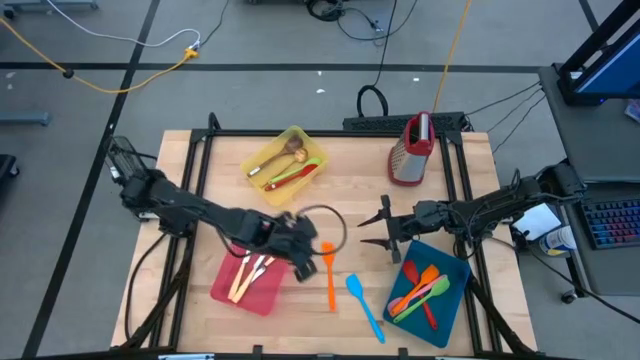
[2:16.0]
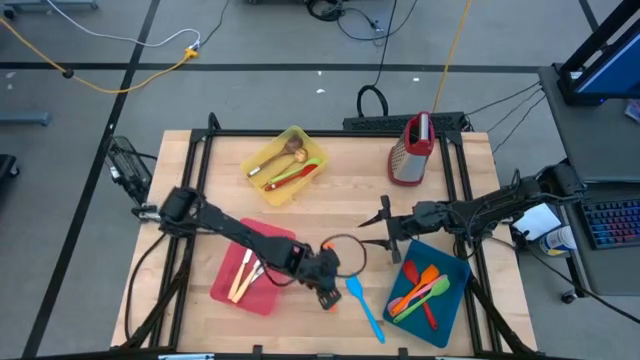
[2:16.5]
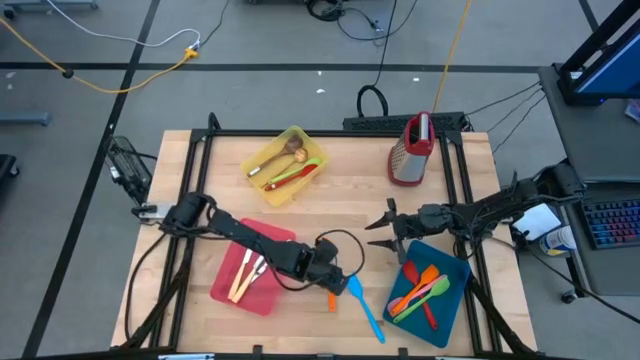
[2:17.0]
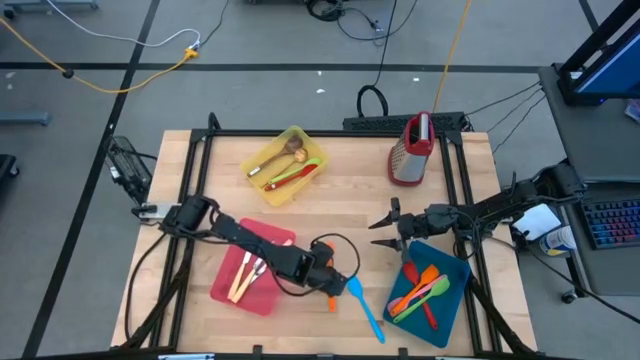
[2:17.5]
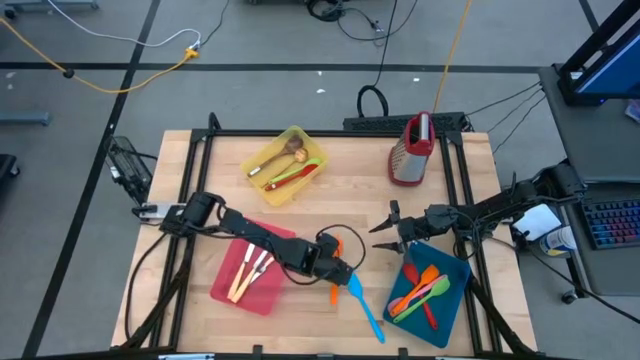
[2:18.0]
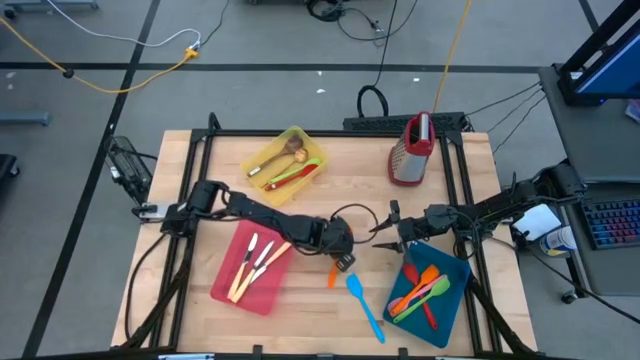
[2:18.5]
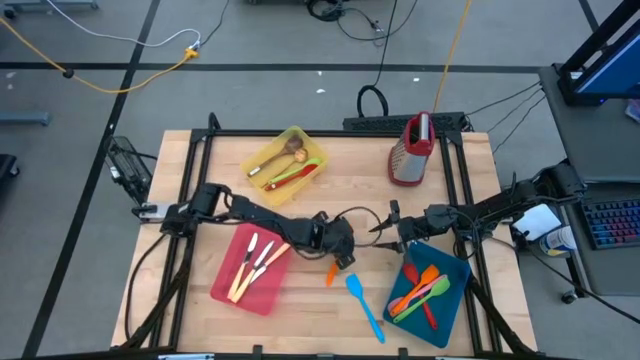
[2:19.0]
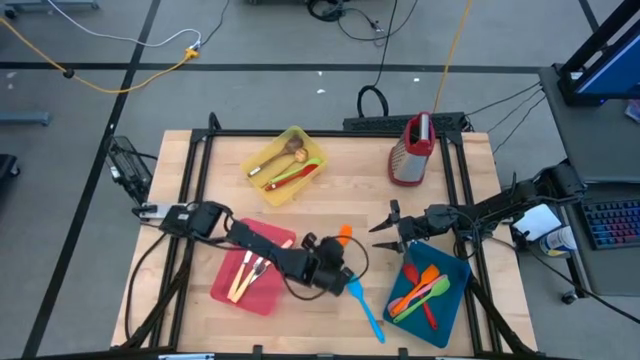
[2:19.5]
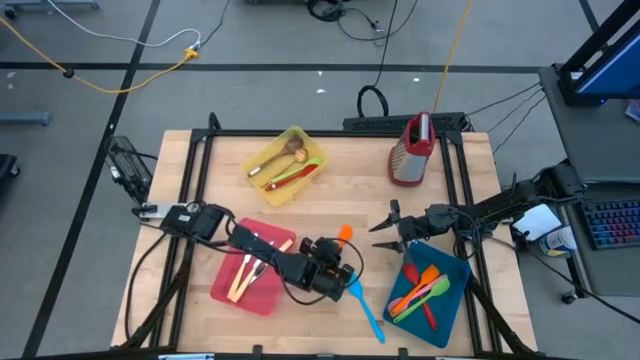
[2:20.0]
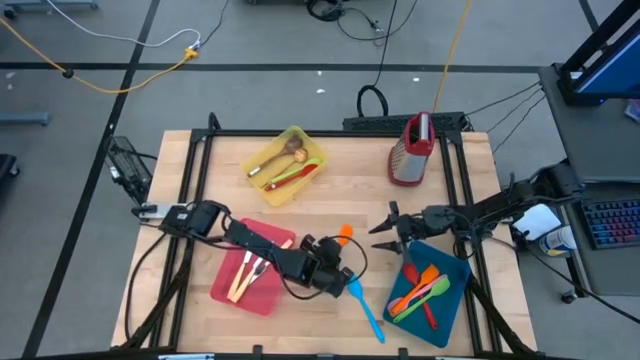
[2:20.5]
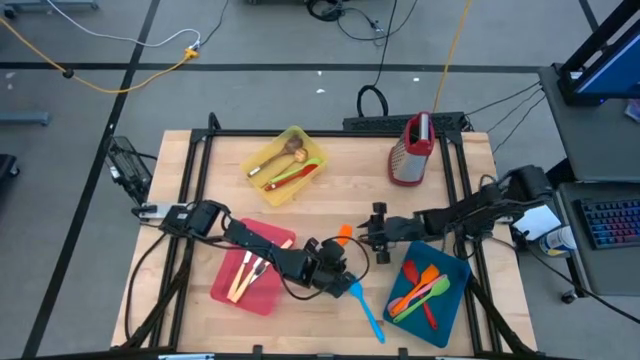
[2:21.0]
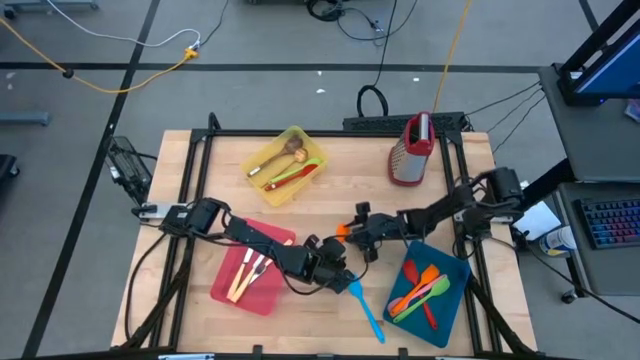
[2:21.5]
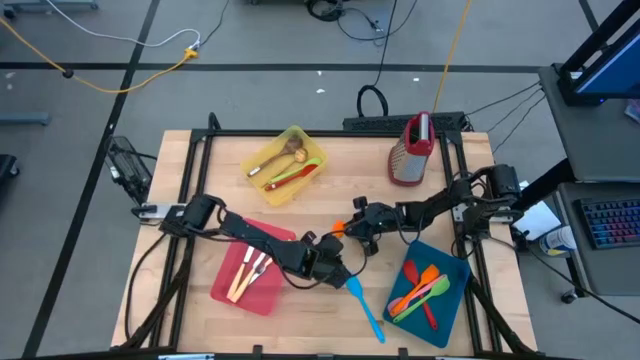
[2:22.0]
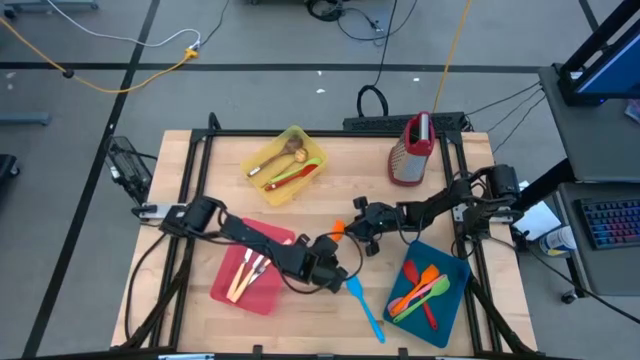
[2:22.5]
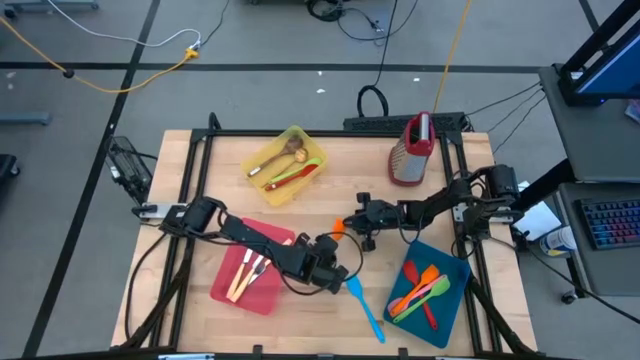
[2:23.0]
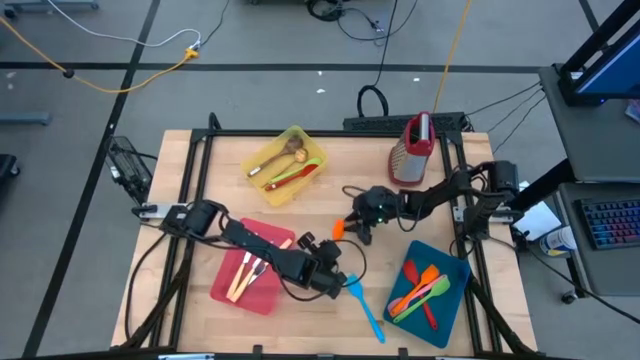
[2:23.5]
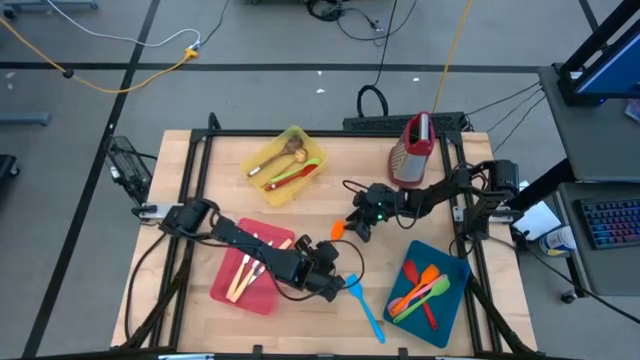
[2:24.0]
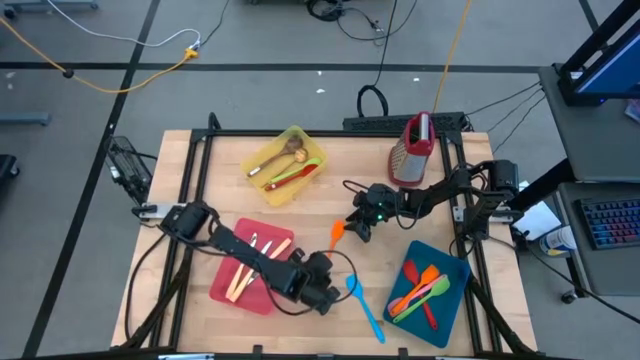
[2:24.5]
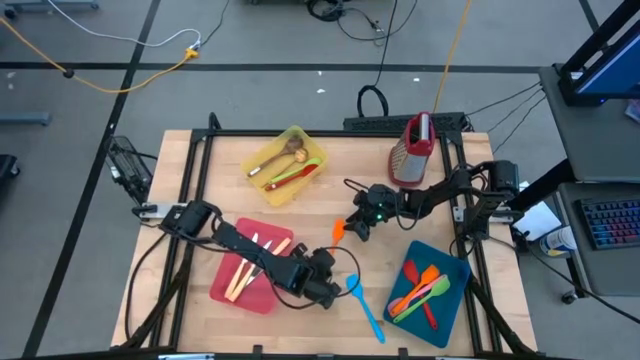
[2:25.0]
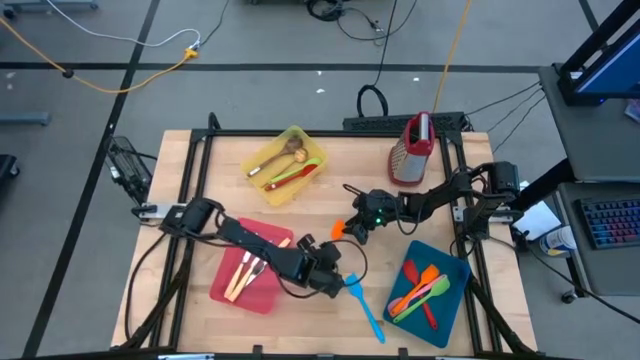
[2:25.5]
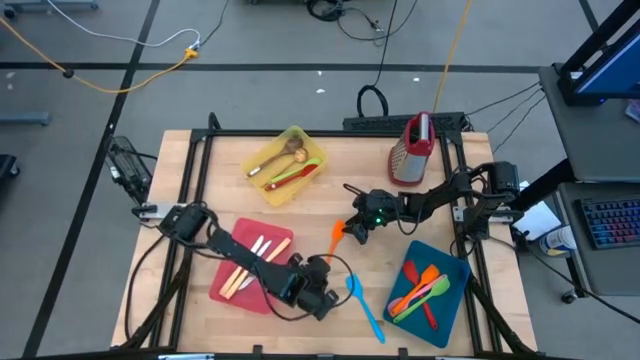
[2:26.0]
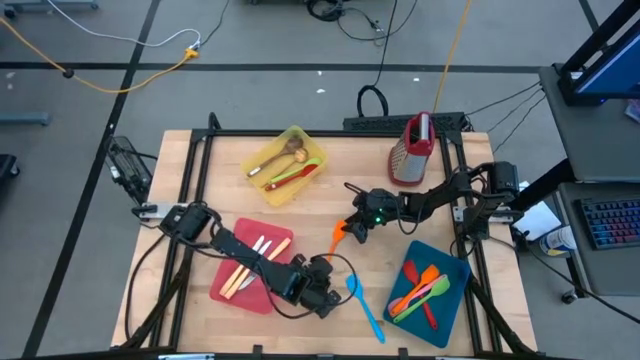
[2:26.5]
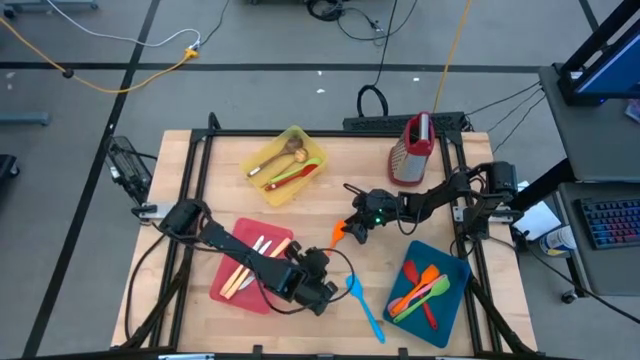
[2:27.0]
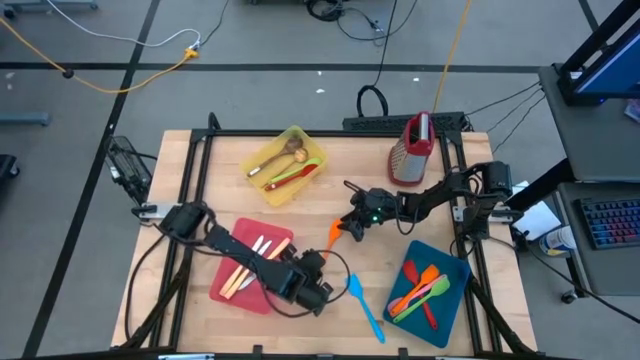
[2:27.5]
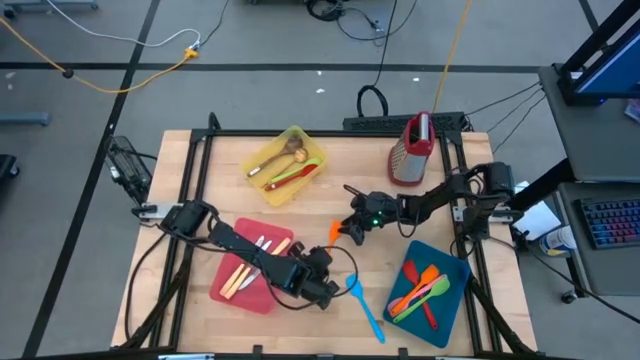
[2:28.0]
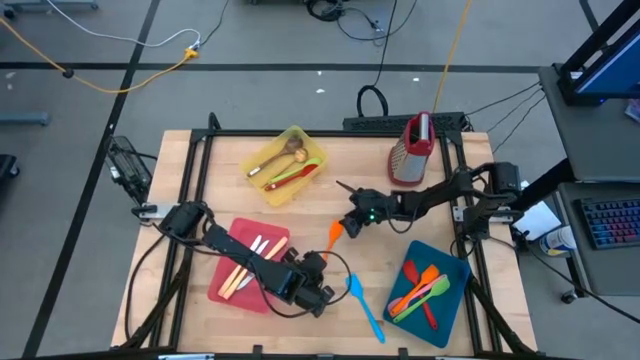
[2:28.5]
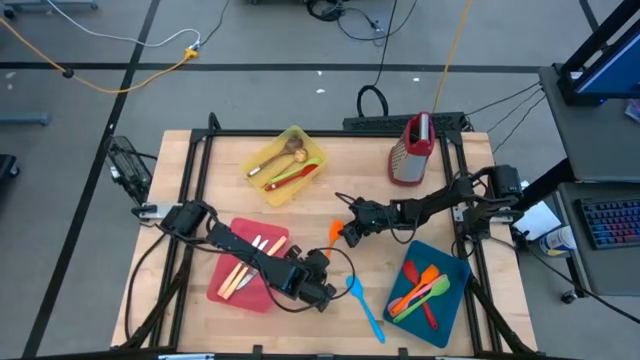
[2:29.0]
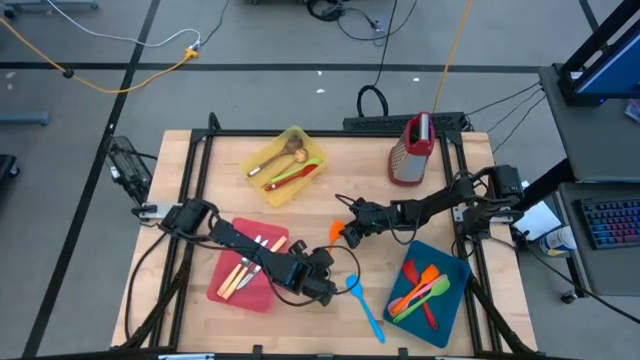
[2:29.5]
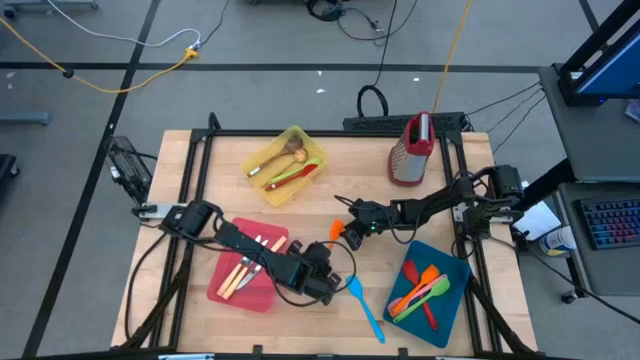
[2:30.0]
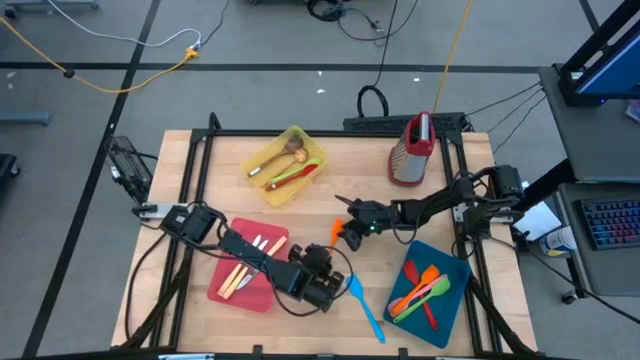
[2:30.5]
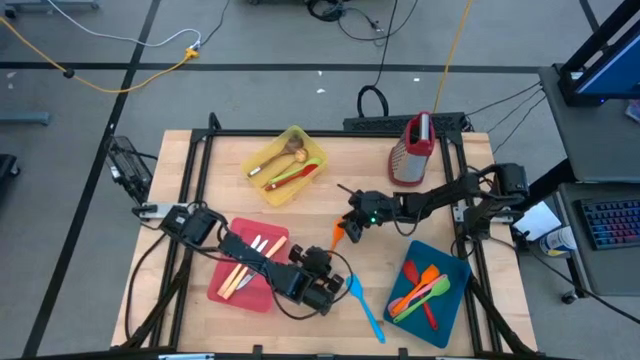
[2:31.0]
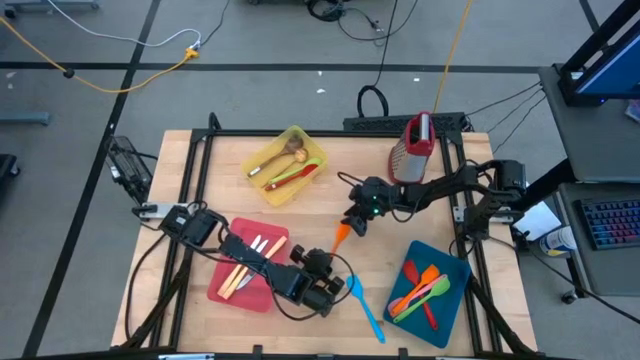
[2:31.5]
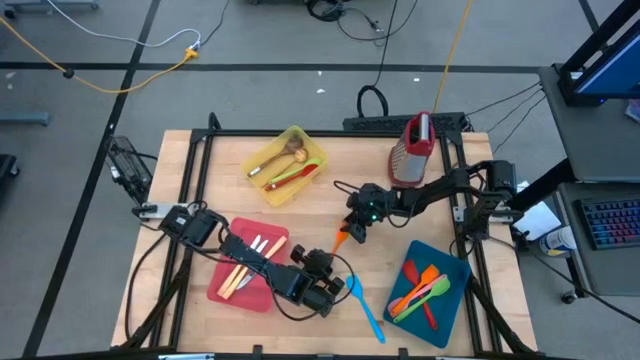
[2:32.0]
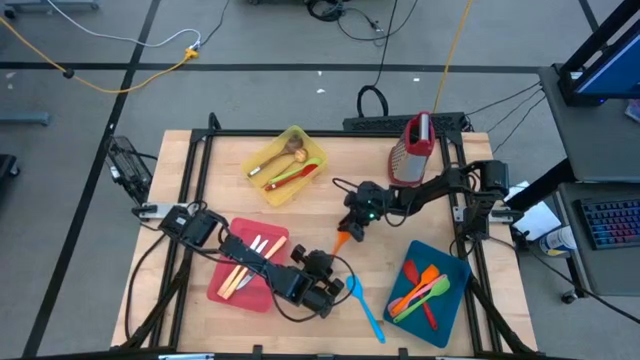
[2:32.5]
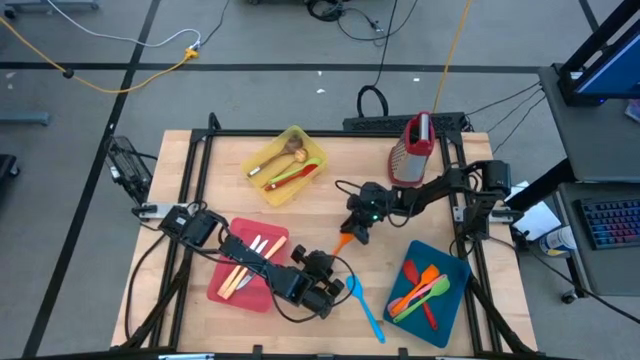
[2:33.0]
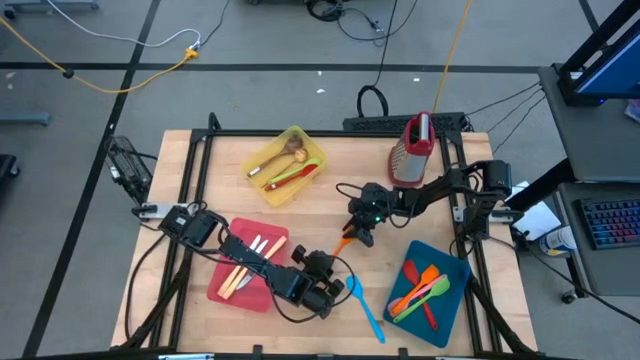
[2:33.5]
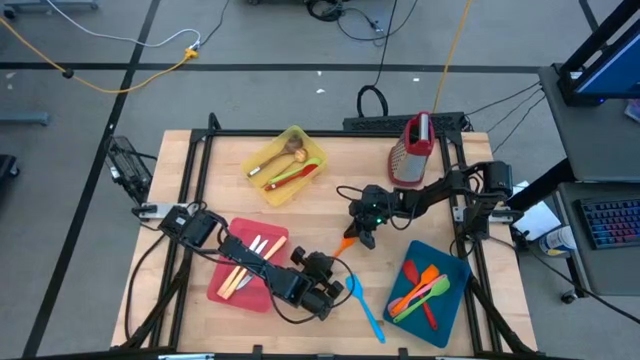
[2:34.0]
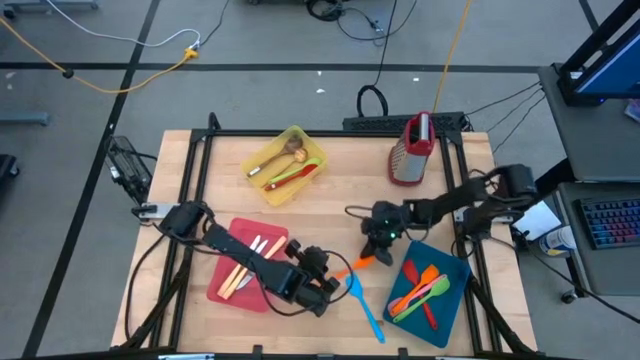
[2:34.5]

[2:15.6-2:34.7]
Task: Pick & Place Kitchen Items
Put the orange baking spatula into the blue bin

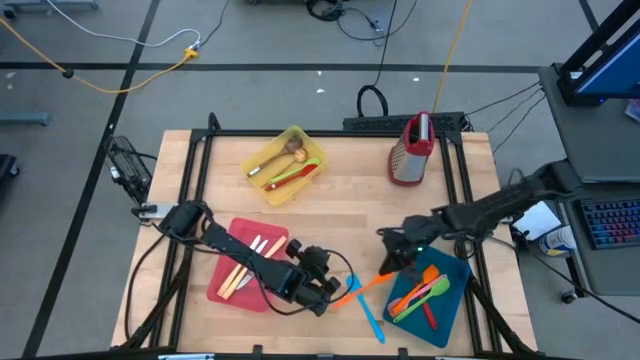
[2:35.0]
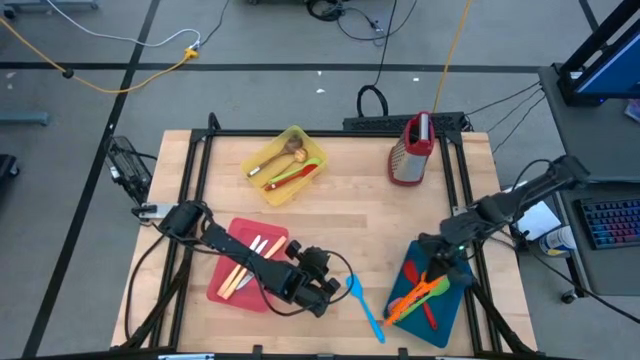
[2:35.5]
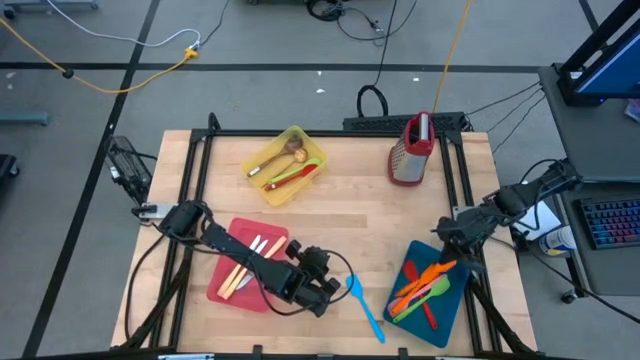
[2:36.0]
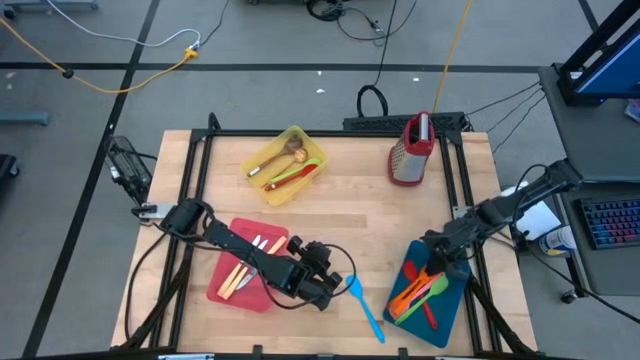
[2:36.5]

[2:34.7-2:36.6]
Put the orange baking spatula into the blue bin
